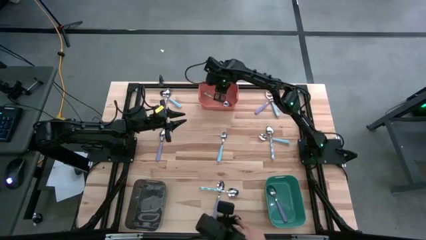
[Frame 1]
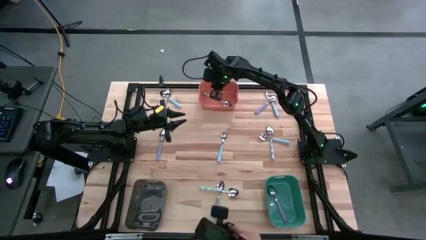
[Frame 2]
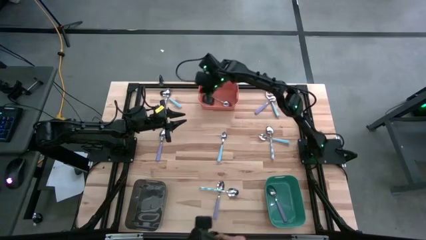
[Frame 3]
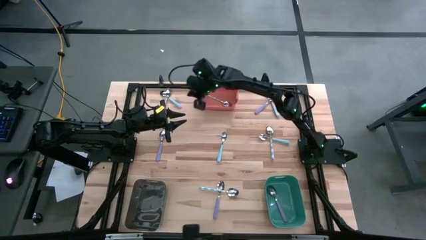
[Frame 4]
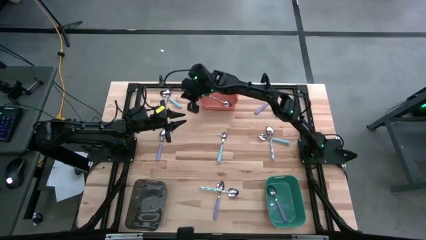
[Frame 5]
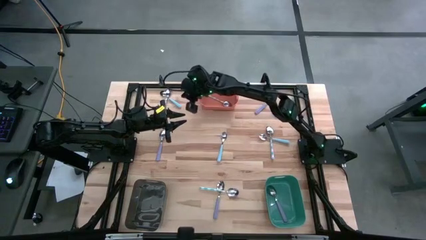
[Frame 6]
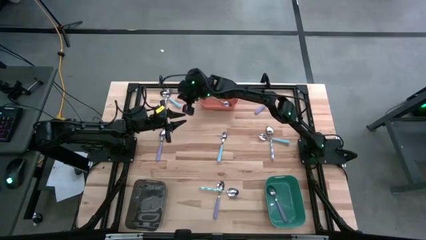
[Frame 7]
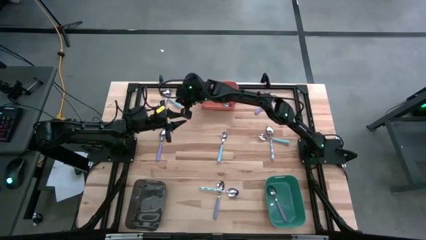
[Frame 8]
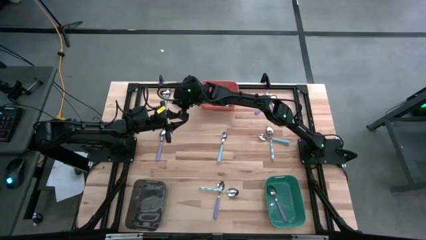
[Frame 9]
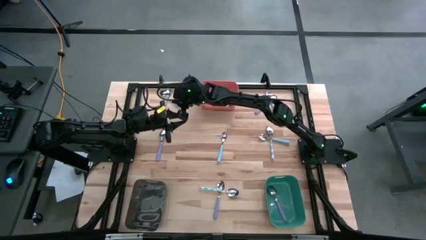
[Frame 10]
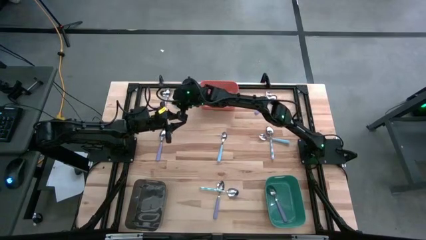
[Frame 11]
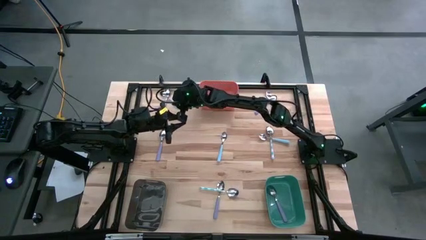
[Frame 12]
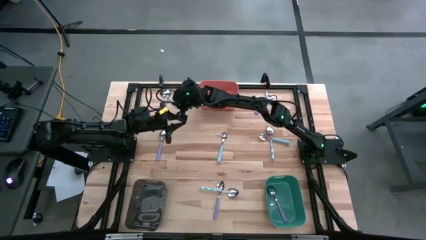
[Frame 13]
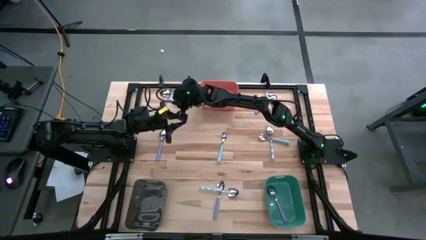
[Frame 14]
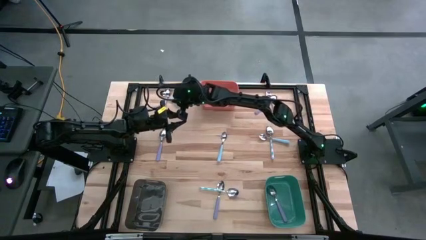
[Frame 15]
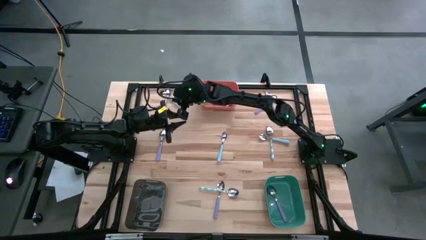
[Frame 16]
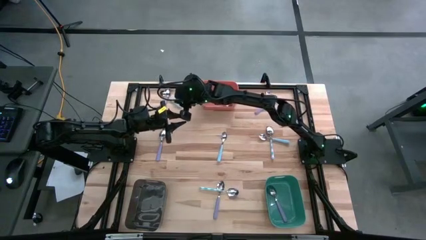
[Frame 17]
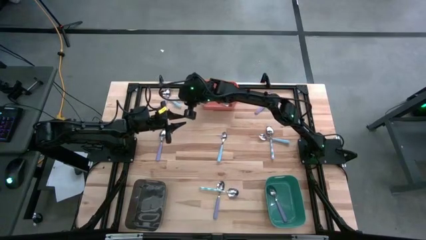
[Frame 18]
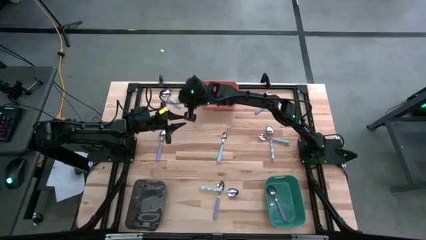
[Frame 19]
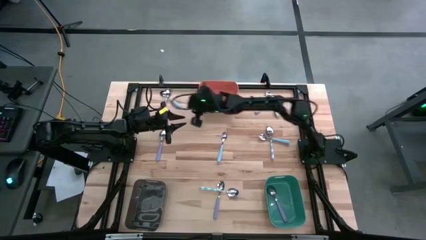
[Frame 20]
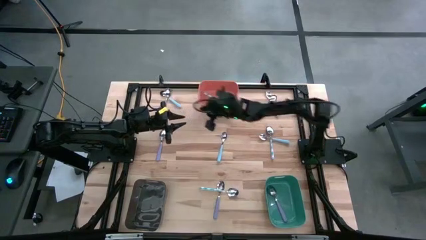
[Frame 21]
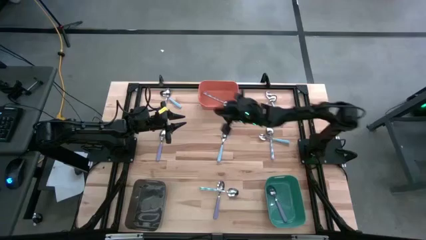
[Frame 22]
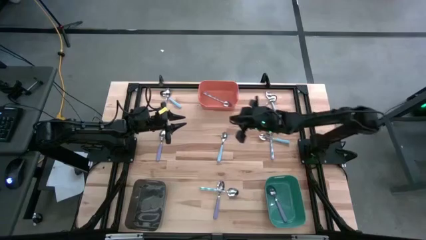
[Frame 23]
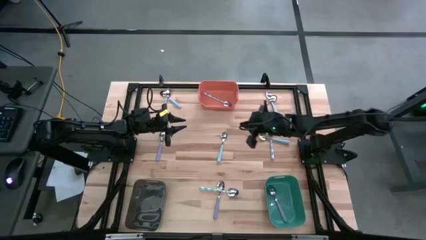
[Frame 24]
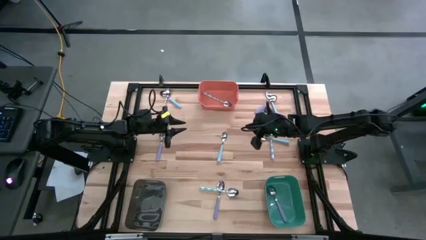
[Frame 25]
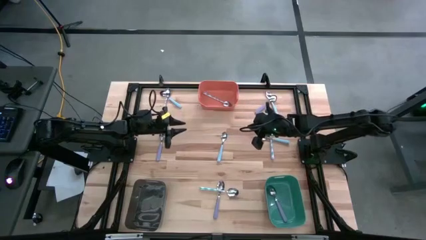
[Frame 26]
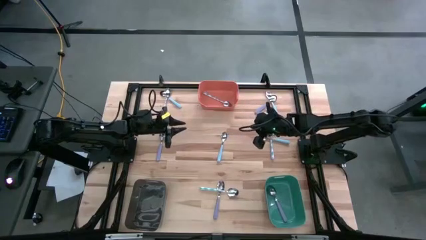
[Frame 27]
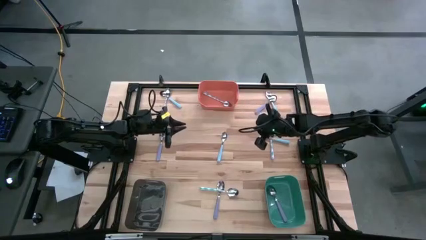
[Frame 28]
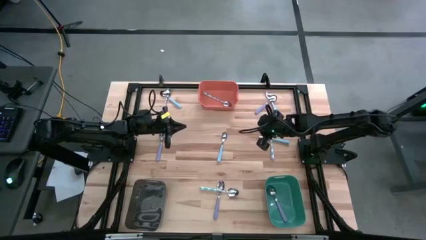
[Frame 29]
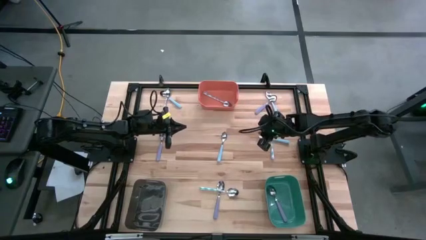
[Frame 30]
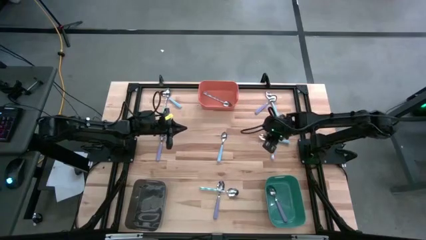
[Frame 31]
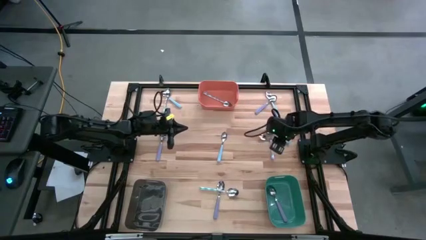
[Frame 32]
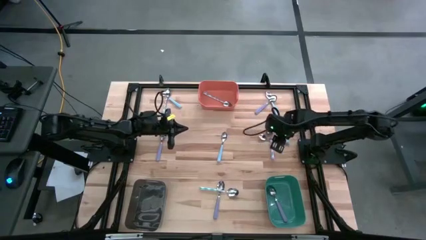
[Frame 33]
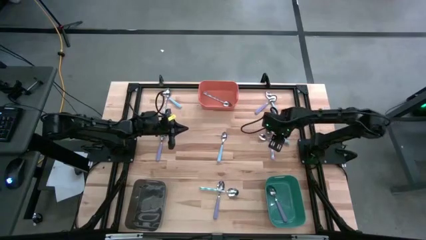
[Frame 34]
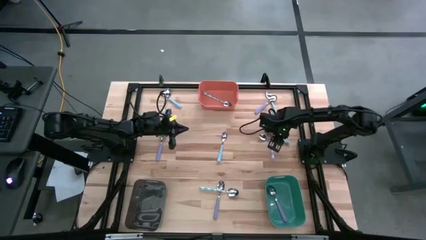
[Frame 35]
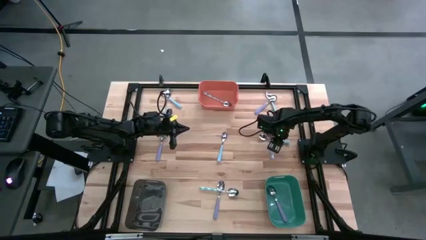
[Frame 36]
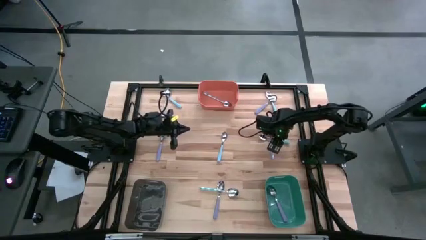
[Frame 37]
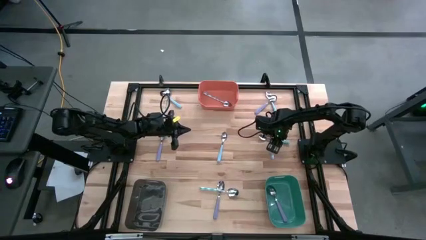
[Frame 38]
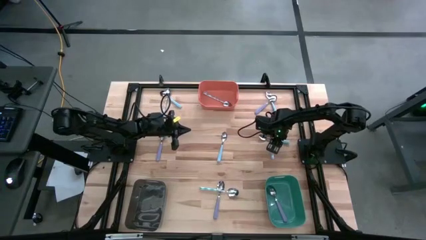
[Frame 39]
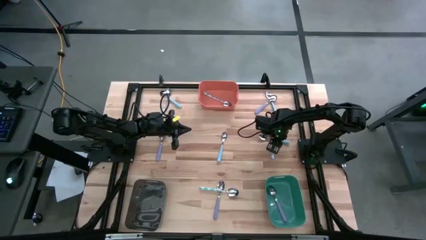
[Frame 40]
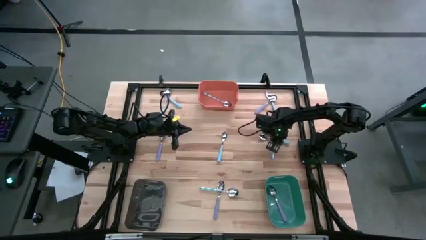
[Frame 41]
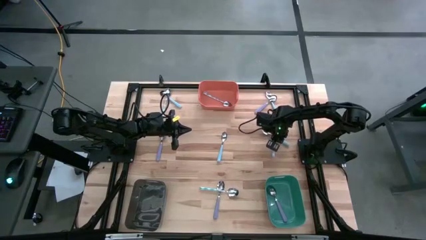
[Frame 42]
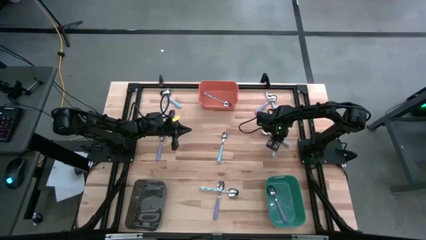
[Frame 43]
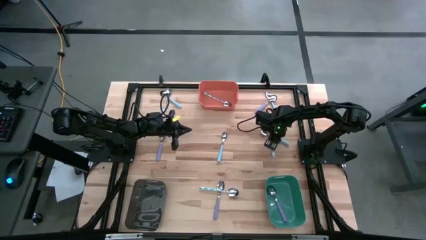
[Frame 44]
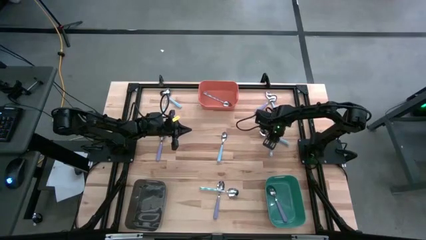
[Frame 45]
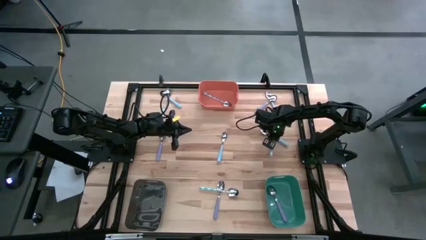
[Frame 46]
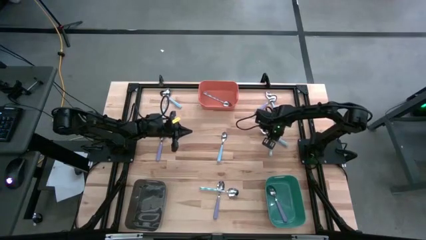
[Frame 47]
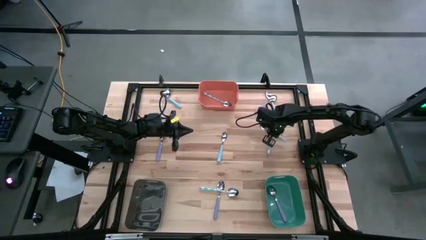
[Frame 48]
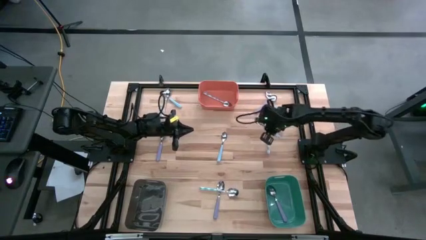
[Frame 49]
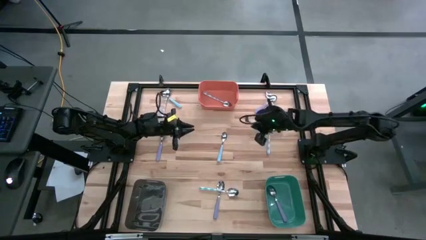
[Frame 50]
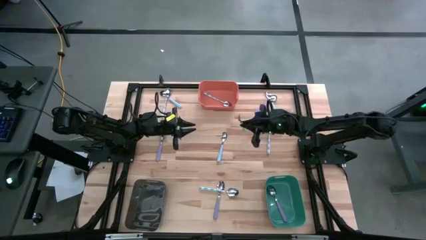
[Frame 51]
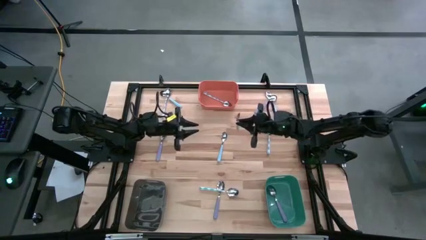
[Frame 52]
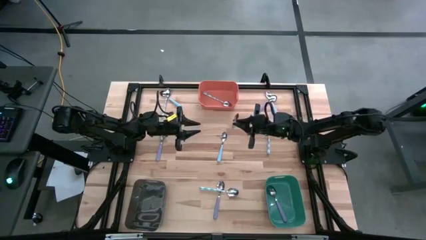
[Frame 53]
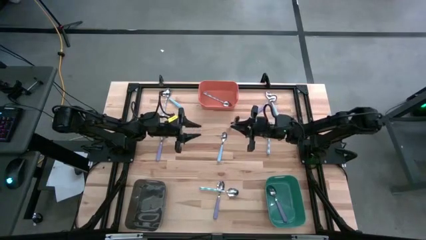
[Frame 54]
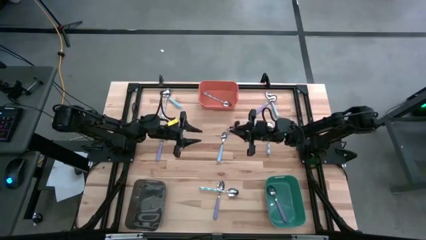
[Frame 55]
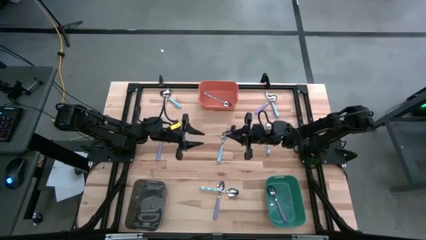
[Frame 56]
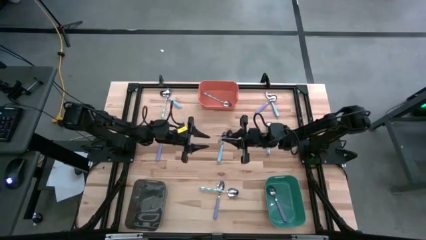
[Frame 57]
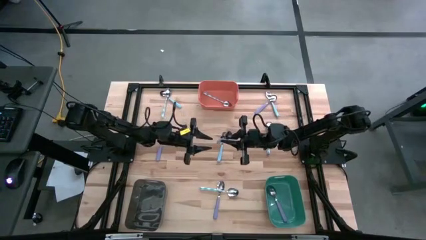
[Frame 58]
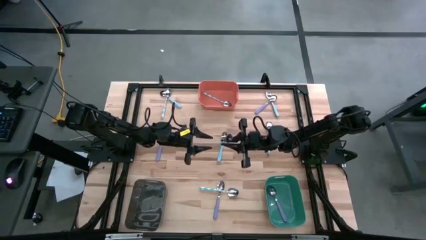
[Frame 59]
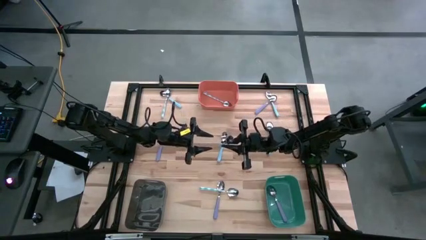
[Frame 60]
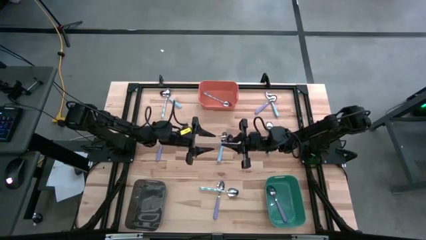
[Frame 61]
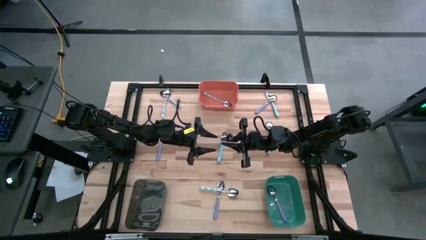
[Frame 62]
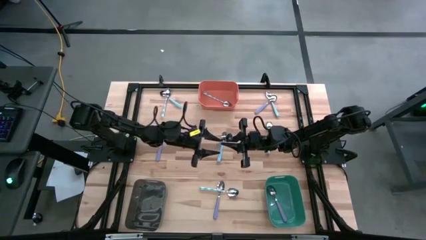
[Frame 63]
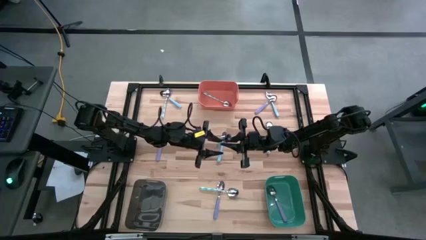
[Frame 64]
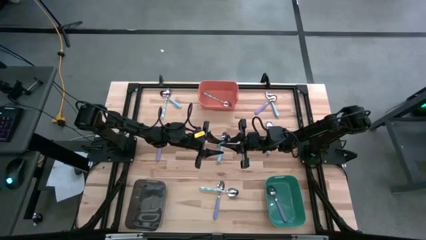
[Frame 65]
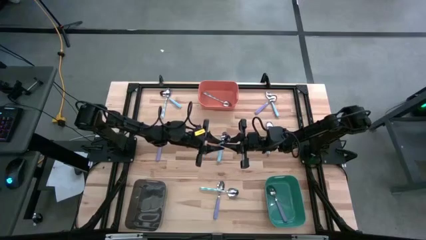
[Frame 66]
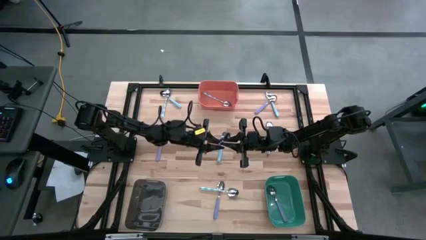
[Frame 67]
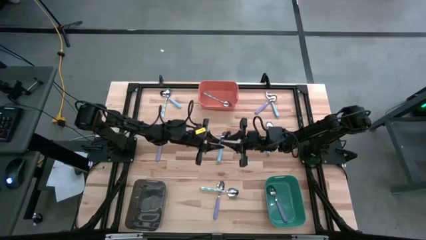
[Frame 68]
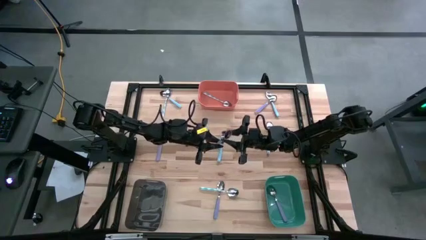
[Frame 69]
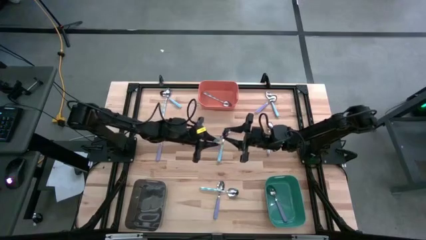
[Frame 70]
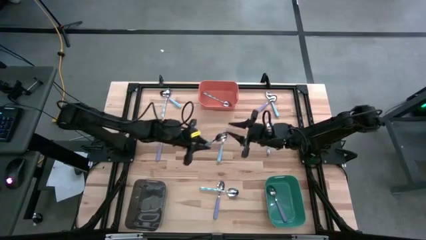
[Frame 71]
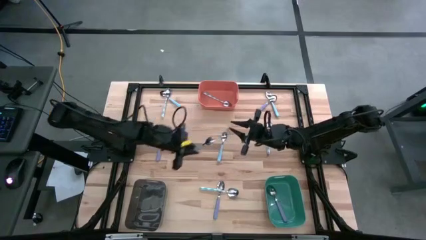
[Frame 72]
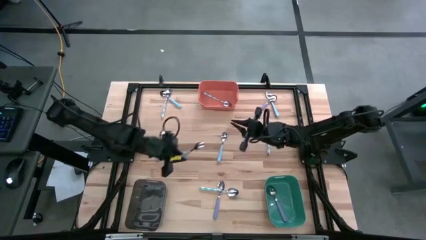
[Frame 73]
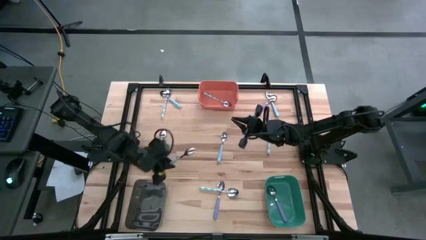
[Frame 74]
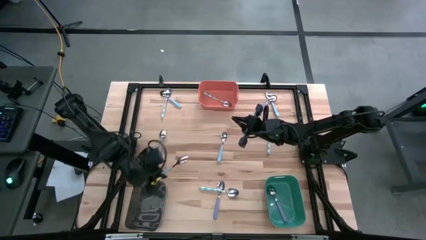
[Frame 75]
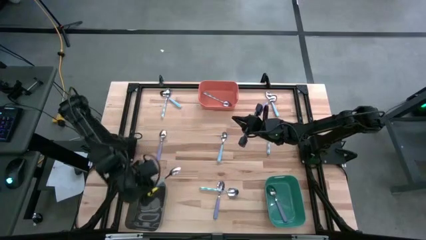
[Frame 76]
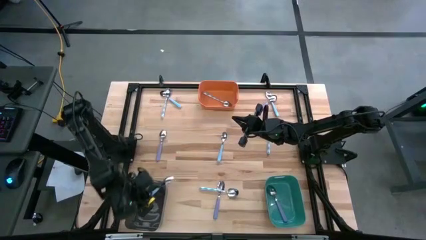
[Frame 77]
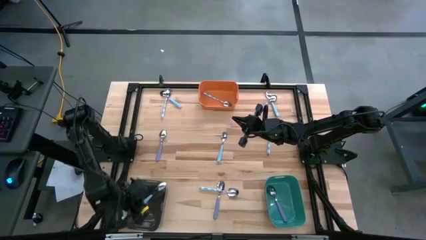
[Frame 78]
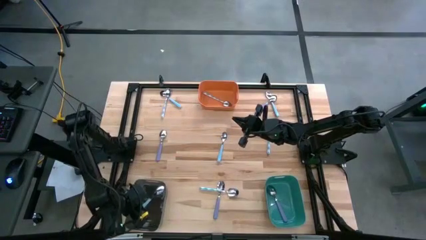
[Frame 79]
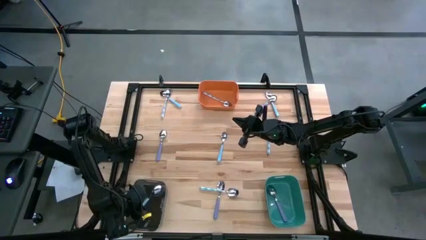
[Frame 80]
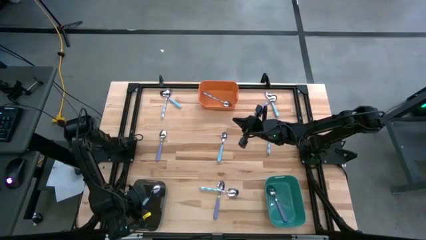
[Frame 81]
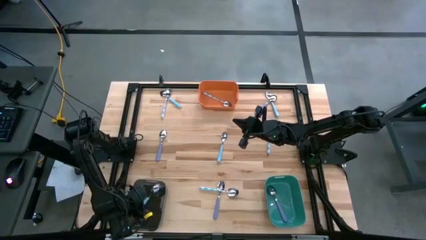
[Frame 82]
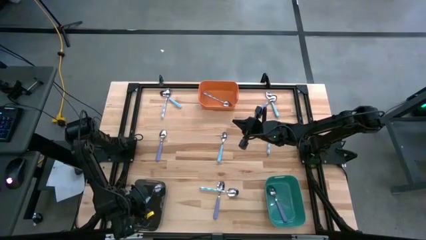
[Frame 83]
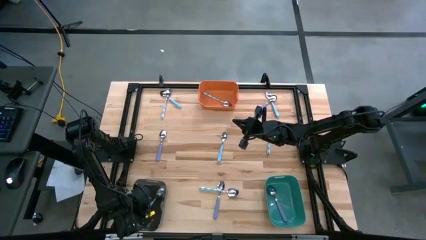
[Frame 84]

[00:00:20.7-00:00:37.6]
Task: Sort silverware by color (type)
Put the right blue spoon into the black bin
